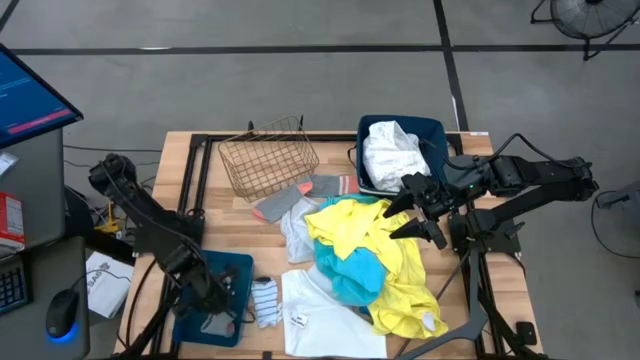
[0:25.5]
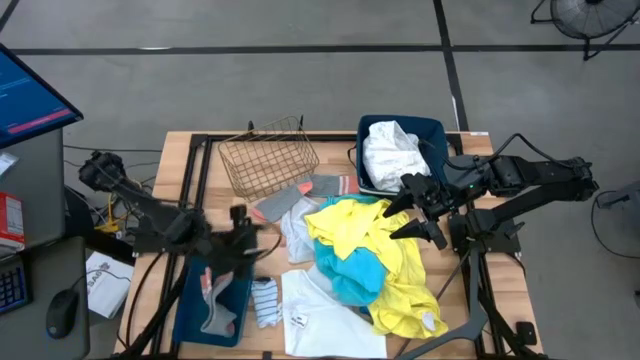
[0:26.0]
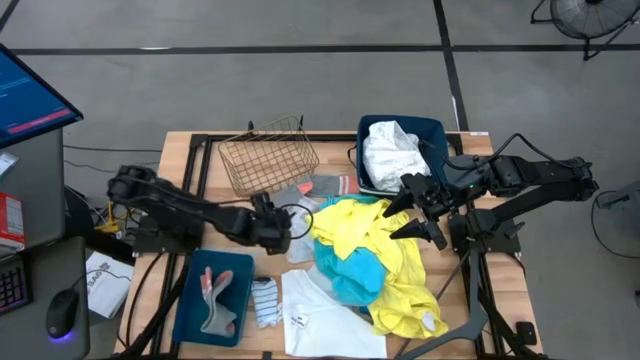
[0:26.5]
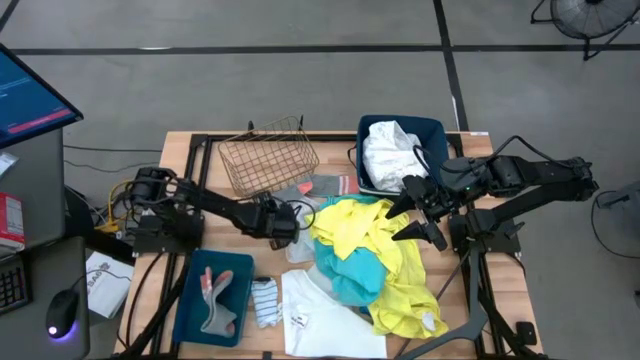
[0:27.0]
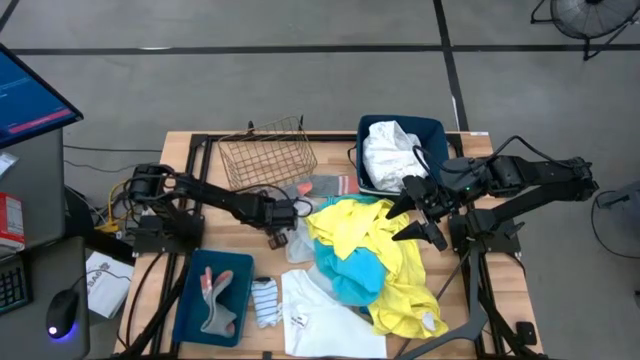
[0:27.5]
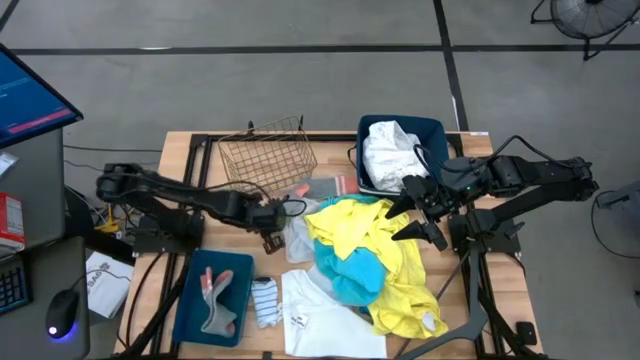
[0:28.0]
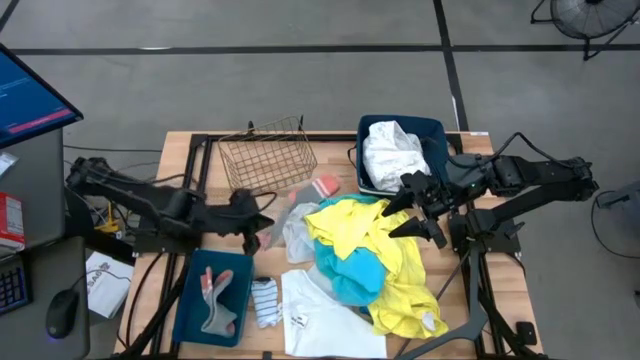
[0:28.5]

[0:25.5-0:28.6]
Task: Pick & Place Cloths
Put the gray sock into the blue bin

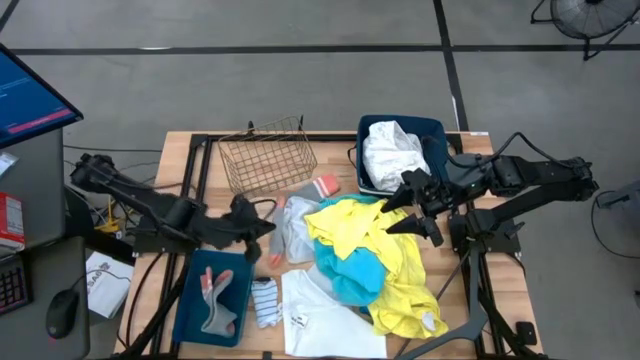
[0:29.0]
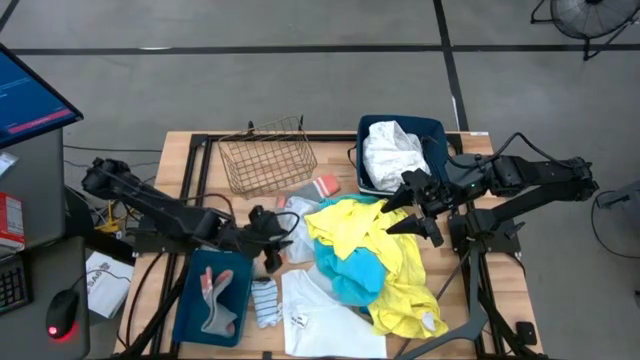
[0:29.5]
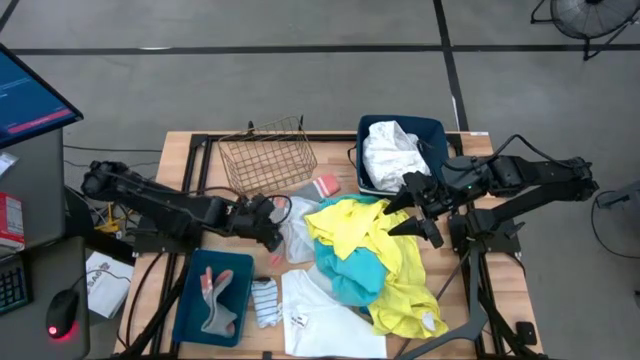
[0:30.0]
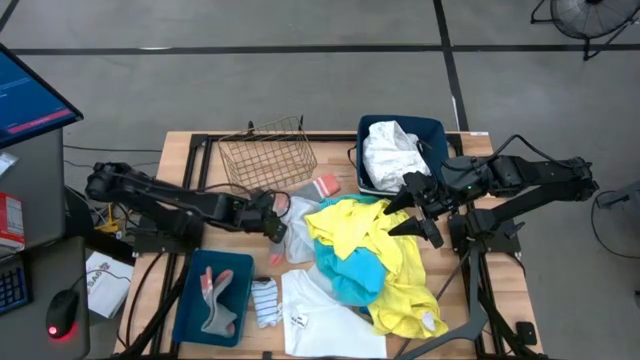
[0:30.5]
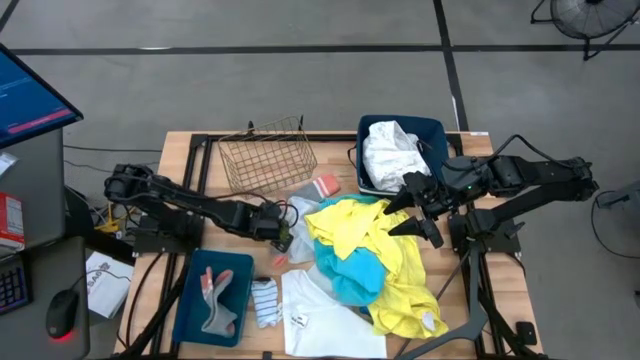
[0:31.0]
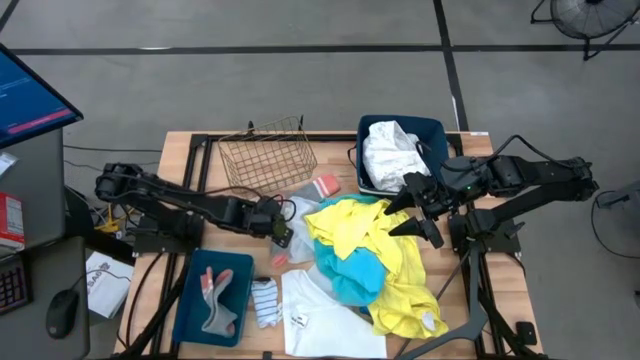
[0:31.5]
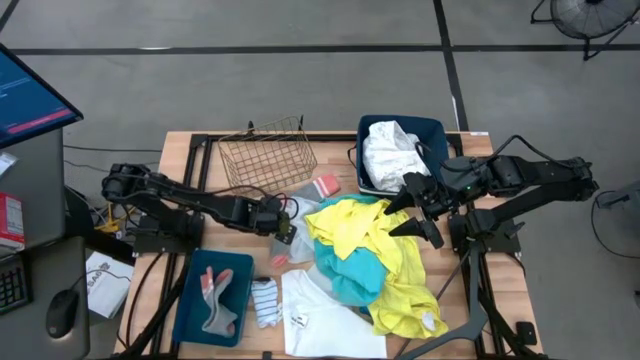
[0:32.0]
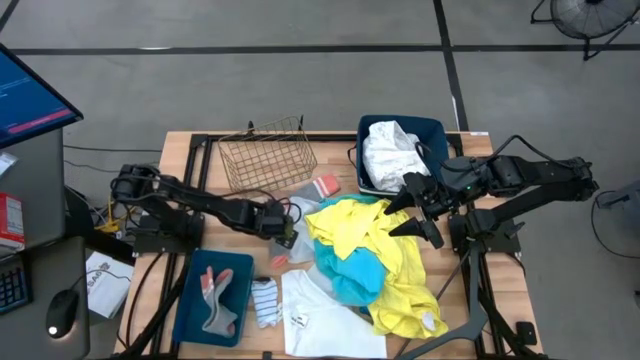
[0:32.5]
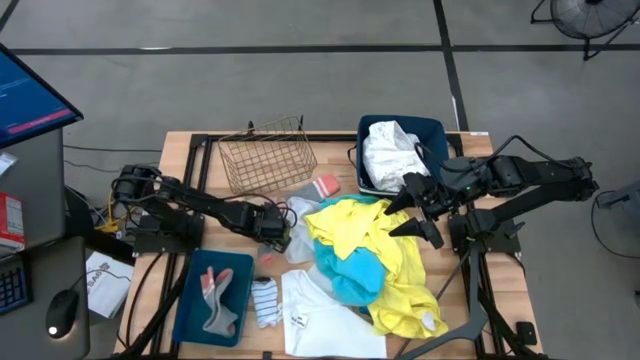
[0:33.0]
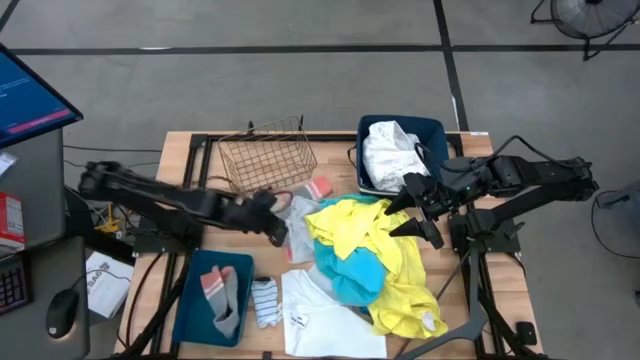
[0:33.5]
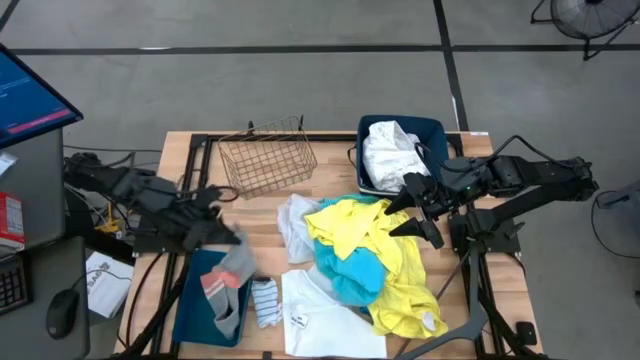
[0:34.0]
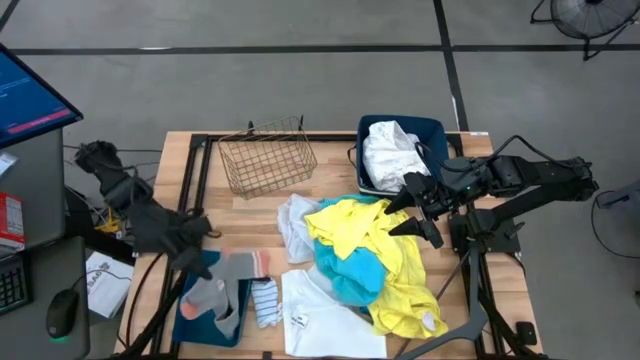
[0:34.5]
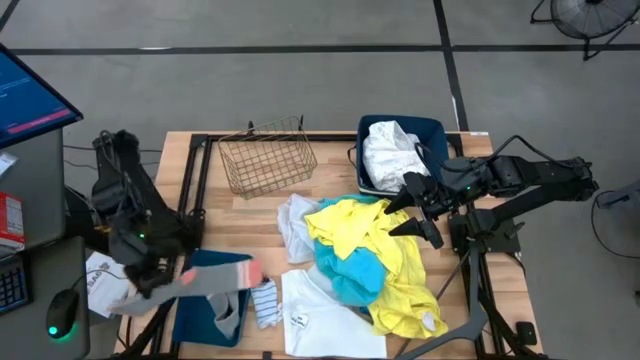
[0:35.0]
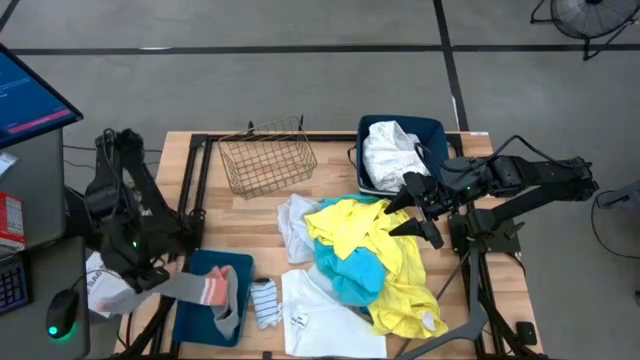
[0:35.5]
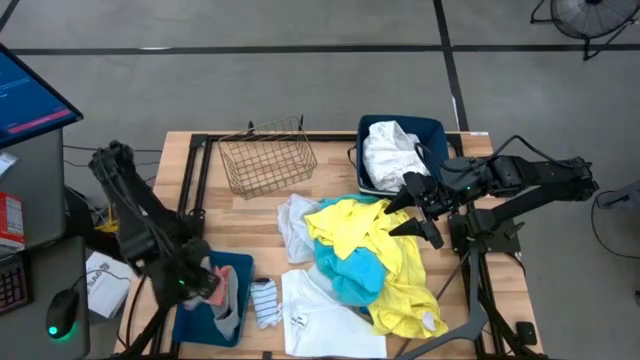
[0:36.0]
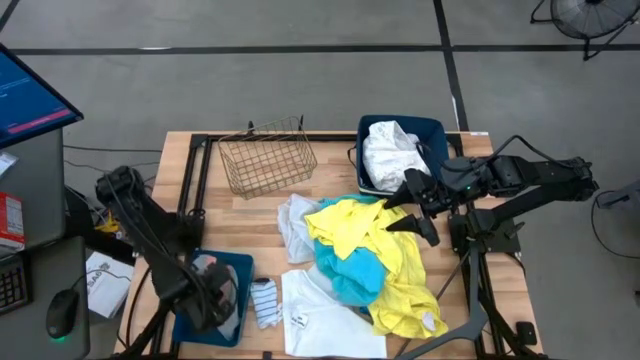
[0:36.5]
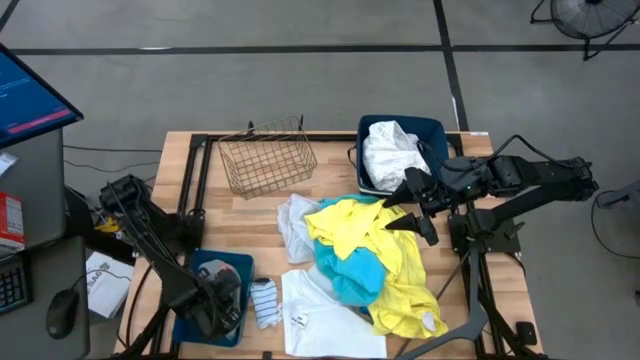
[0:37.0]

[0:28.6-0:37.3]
Put the gray sock into the blue bin

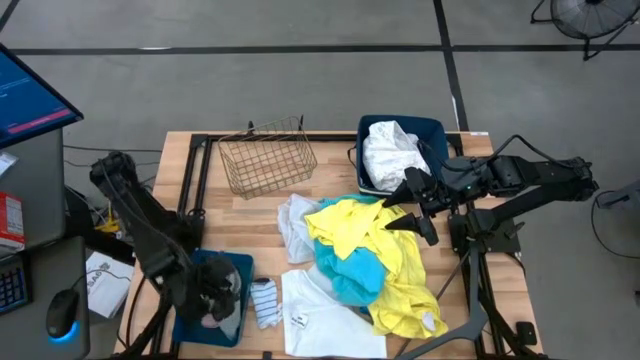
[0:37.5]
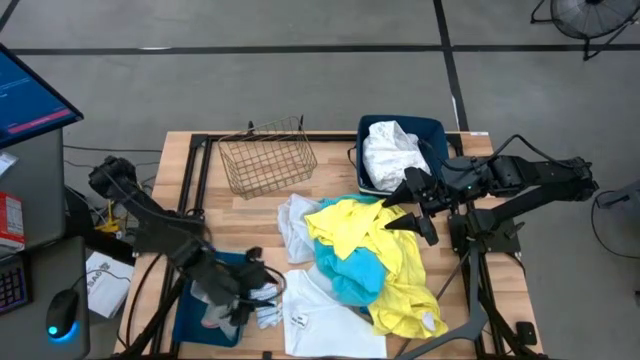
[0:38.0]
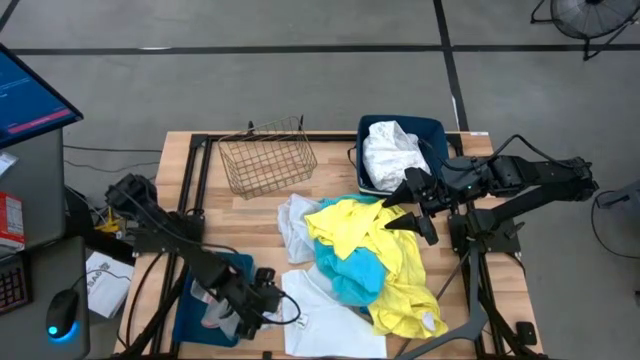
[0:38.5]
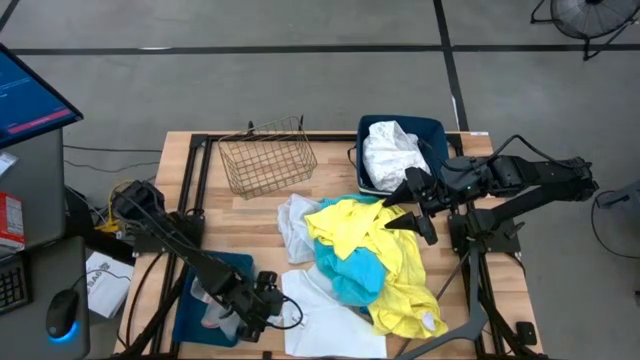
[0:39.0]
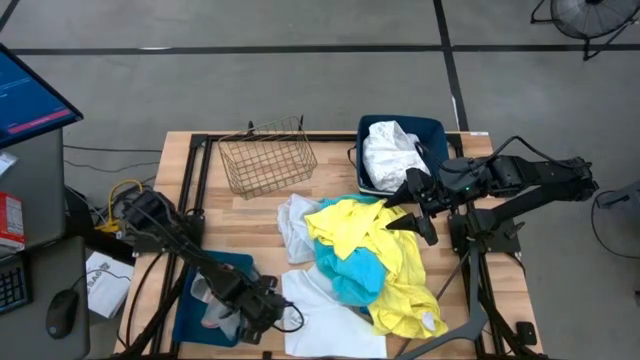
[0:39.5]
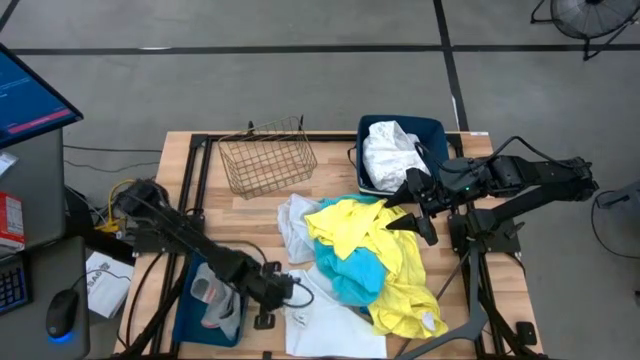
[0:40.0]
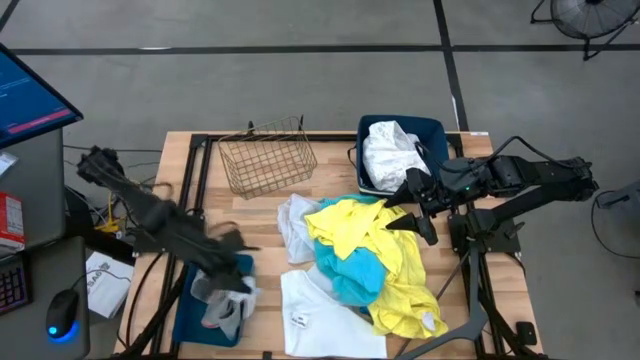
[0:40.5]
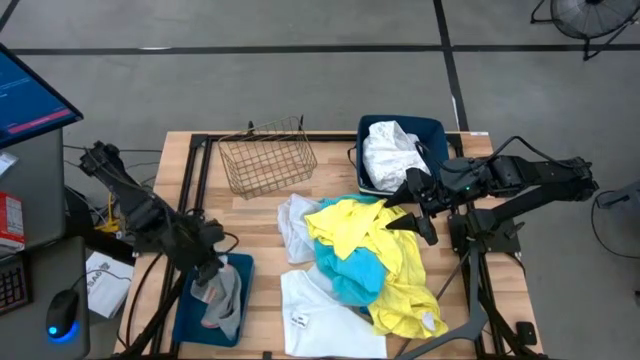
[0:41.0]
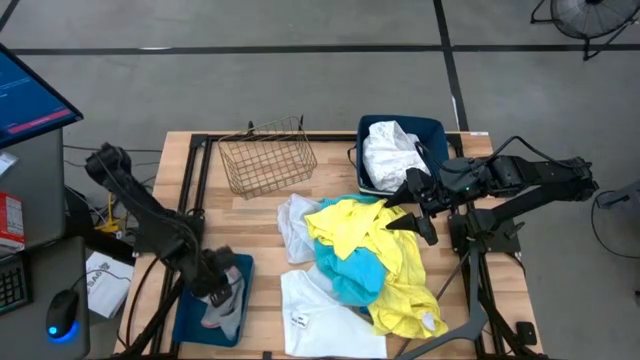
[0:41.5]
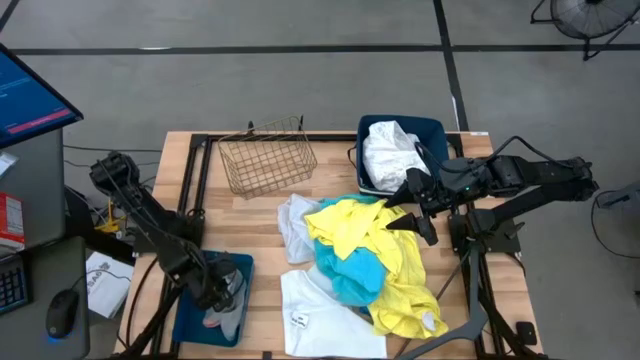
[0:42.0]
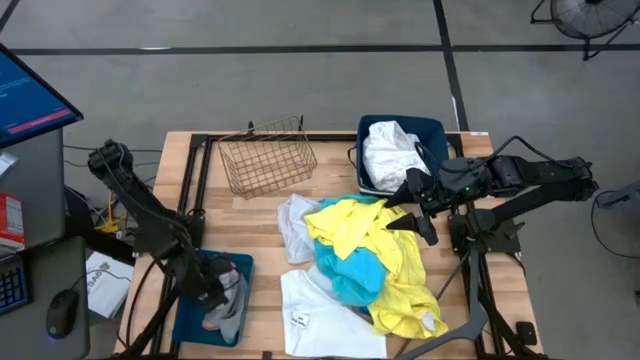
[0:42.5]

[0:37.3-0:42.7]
Put the white striped sock into the blue bin

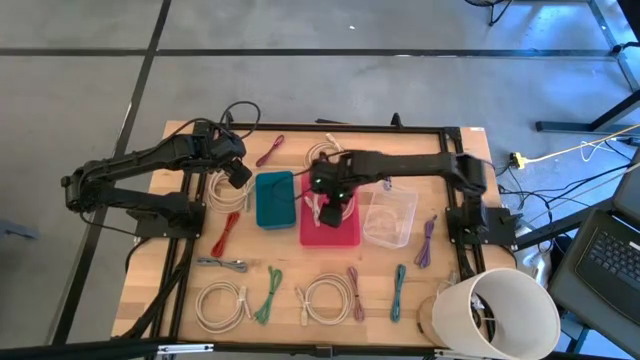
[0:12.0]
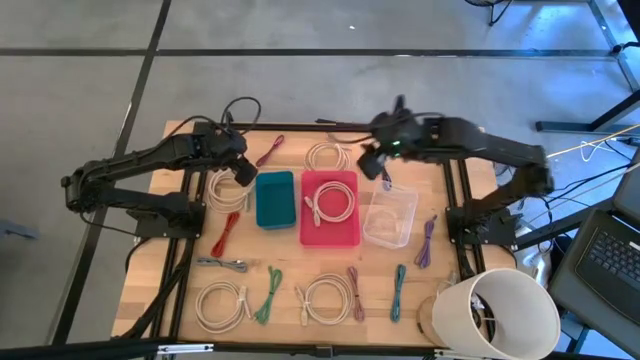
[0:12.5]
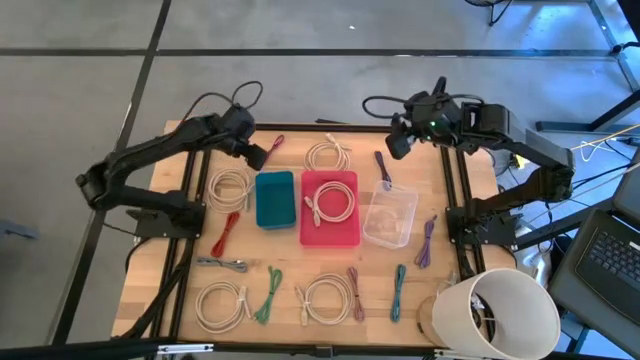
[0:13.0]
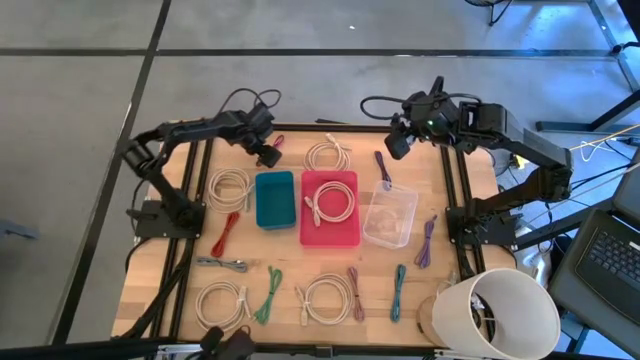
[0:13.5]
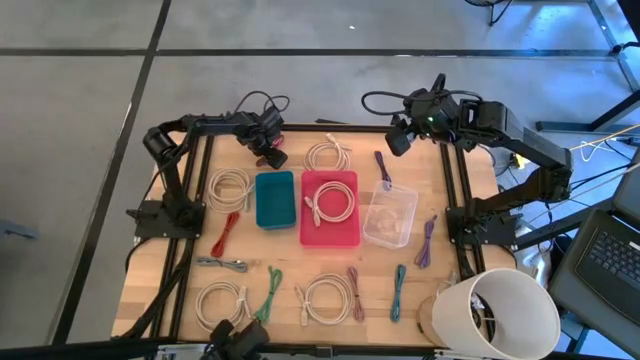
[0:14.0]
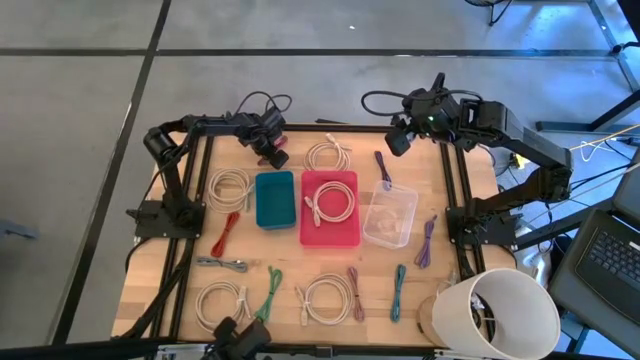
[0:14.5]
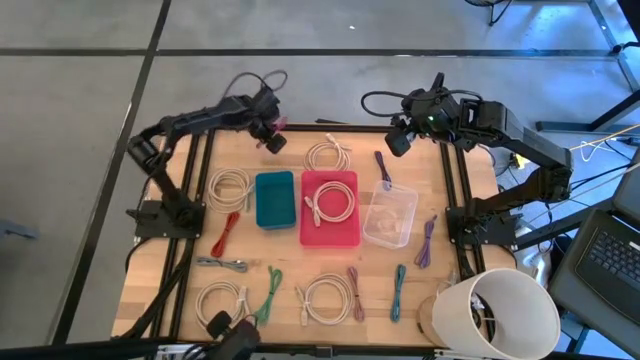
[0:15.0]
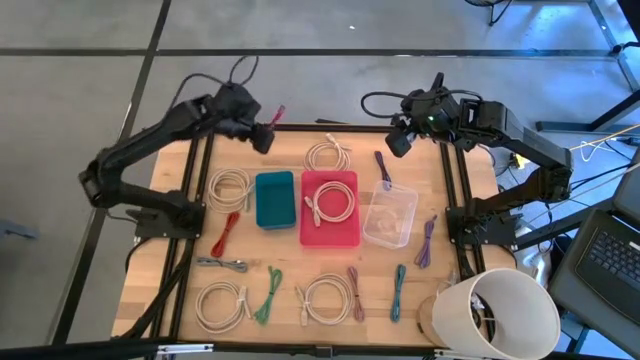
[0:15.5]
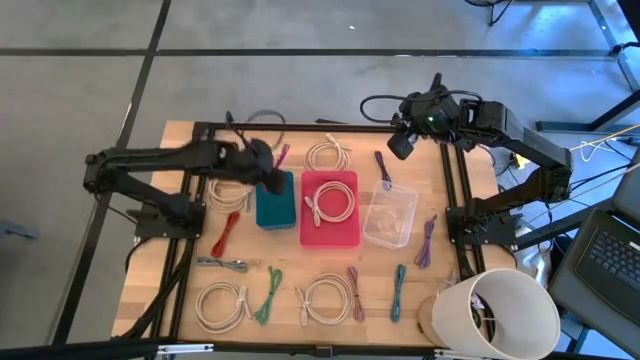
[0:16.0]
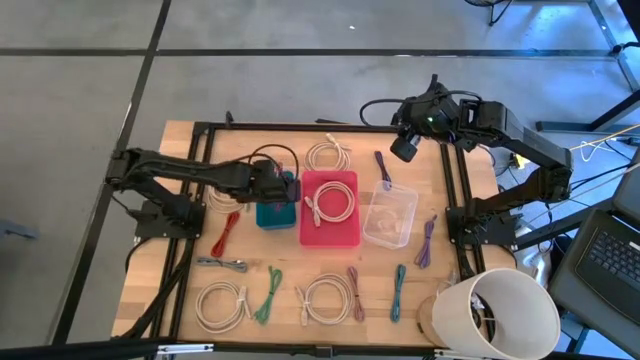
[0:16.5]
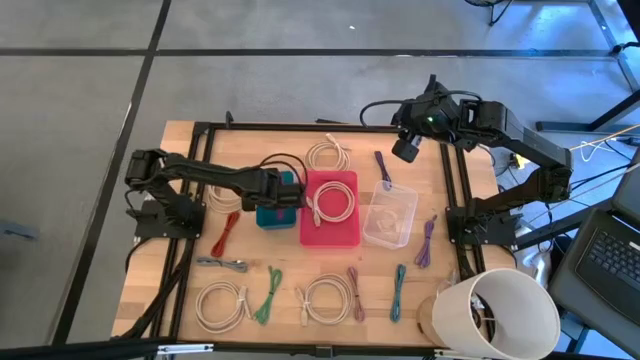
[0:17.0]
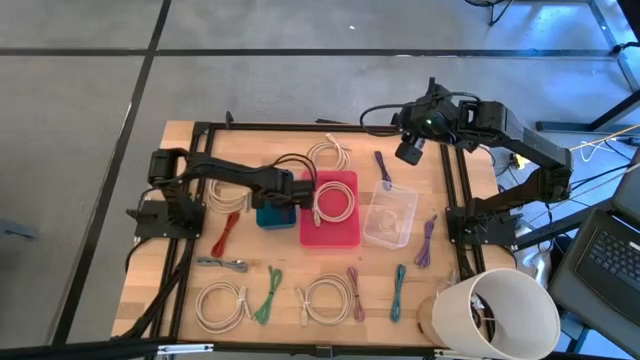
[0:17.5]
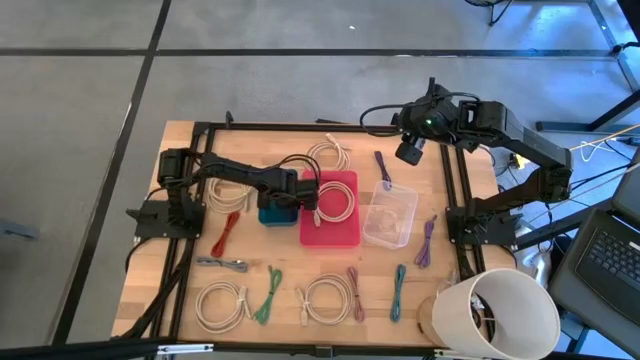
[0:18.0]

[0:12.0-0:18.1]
Task: Pick & Place USB Port
Put the pink and black charger cable into the blue bin
